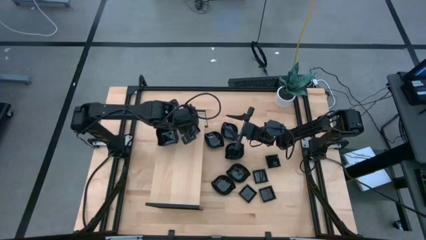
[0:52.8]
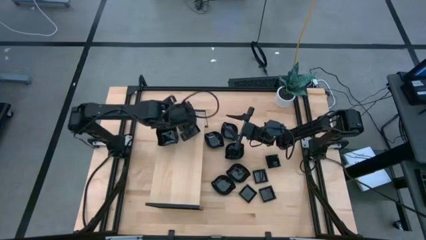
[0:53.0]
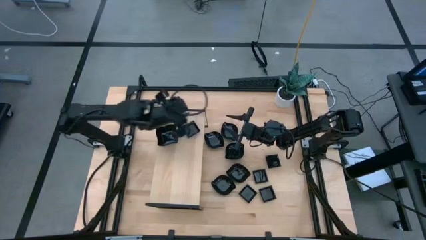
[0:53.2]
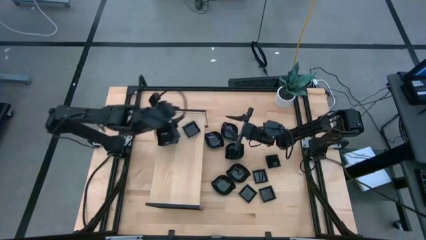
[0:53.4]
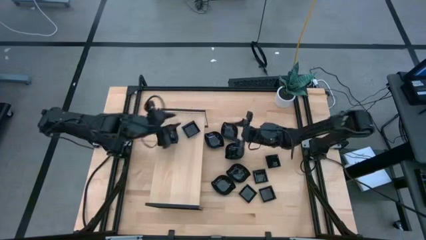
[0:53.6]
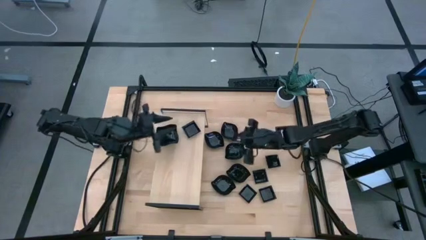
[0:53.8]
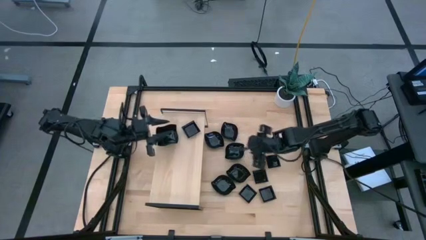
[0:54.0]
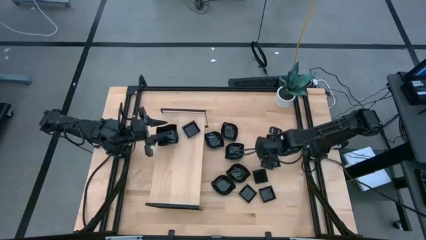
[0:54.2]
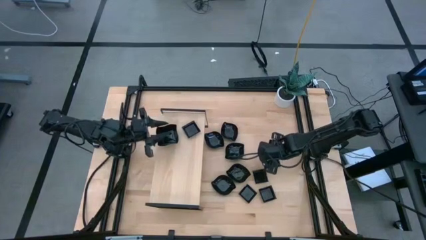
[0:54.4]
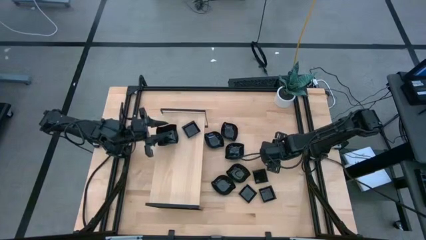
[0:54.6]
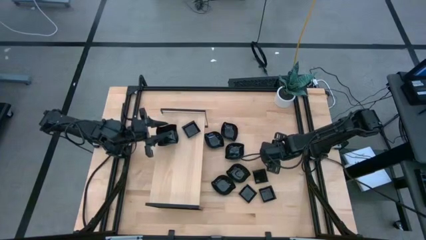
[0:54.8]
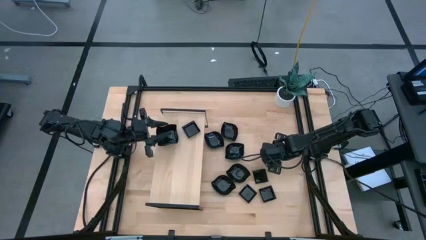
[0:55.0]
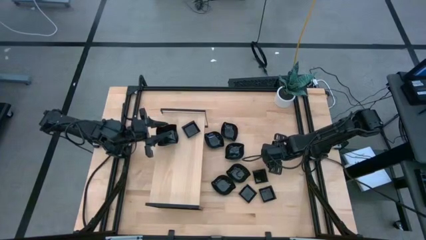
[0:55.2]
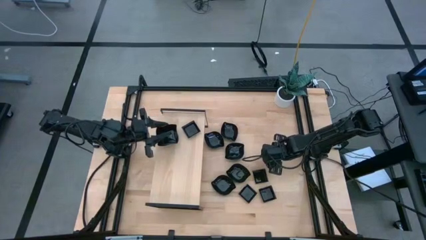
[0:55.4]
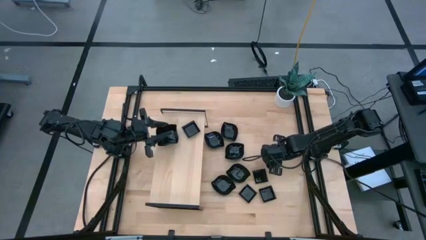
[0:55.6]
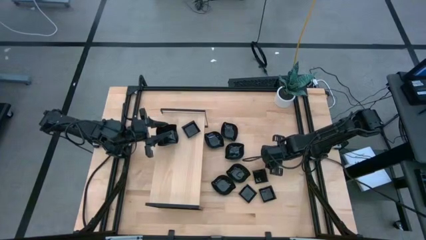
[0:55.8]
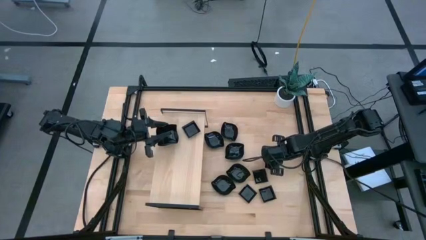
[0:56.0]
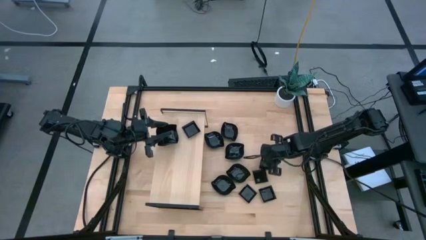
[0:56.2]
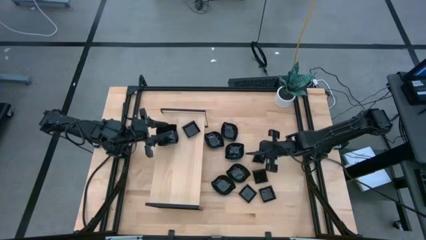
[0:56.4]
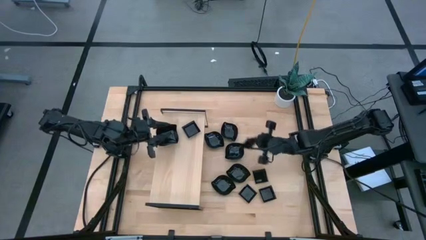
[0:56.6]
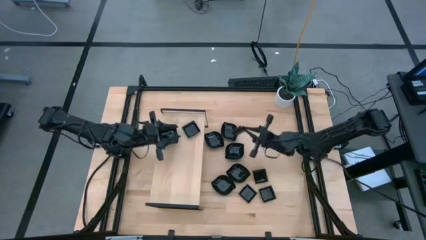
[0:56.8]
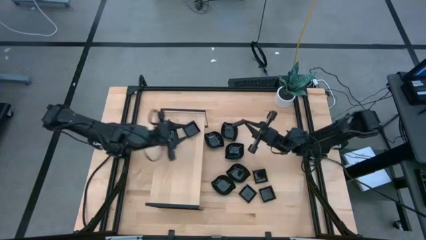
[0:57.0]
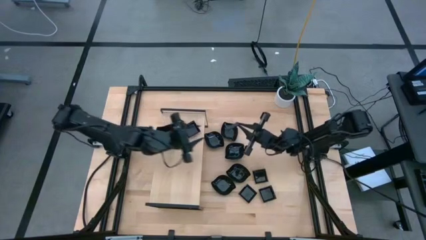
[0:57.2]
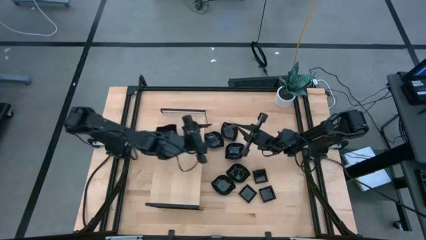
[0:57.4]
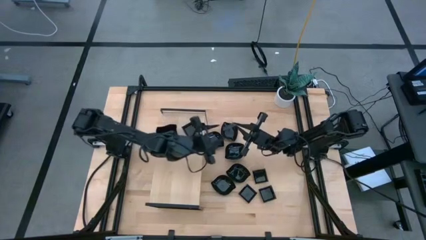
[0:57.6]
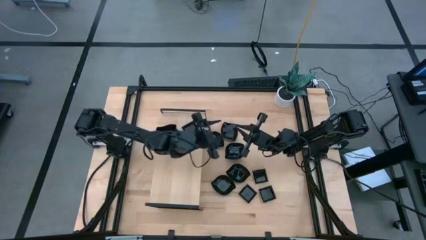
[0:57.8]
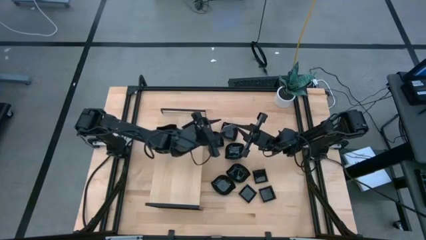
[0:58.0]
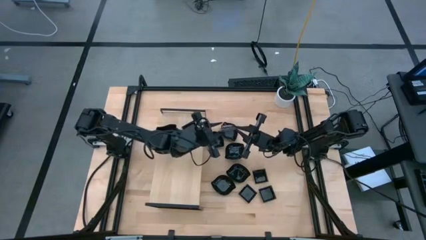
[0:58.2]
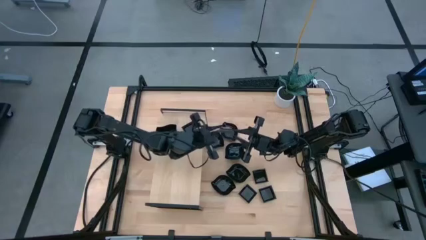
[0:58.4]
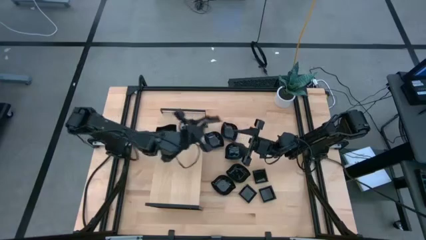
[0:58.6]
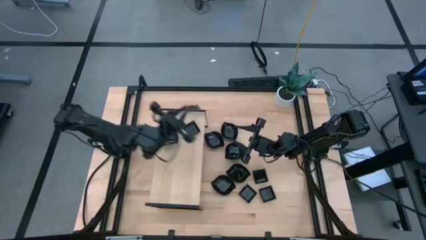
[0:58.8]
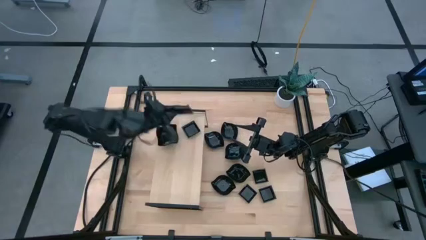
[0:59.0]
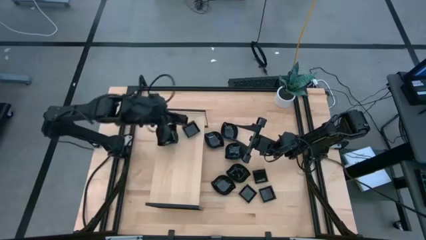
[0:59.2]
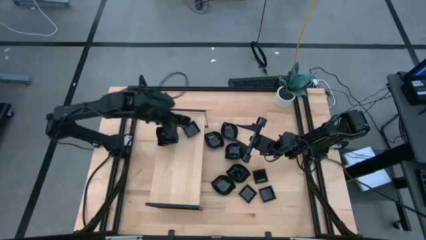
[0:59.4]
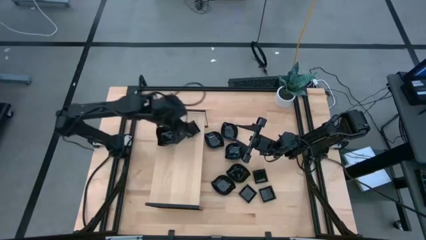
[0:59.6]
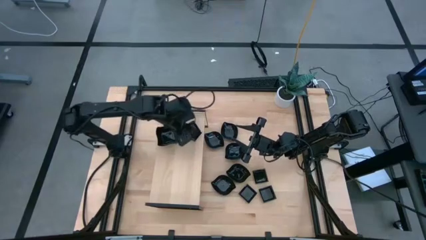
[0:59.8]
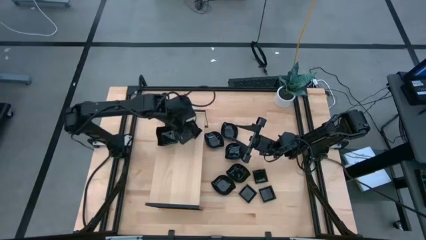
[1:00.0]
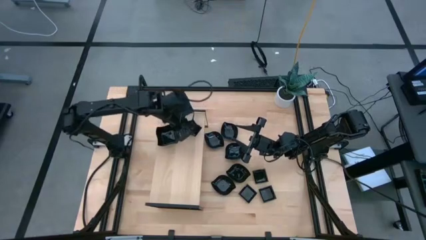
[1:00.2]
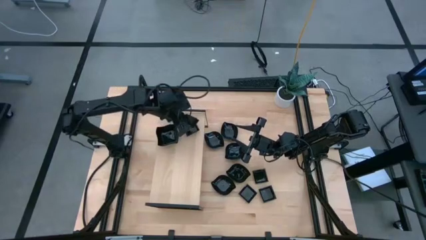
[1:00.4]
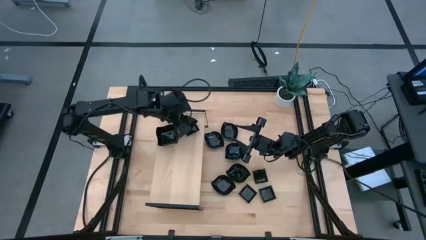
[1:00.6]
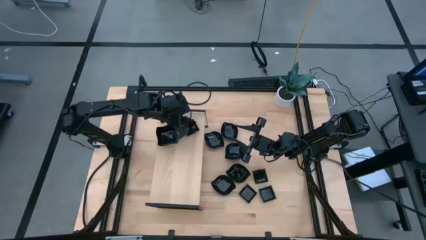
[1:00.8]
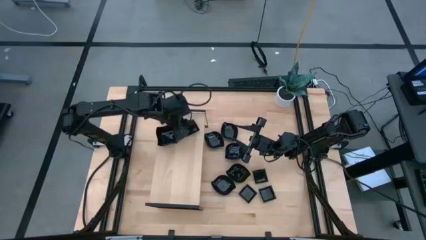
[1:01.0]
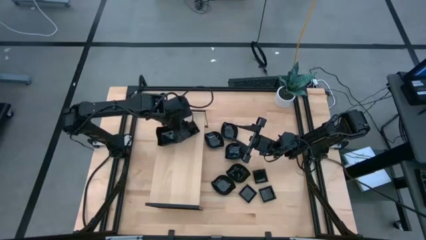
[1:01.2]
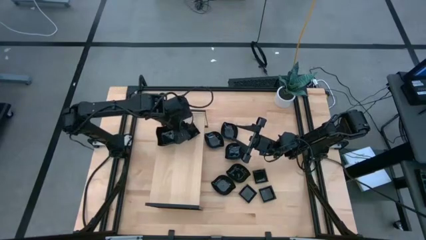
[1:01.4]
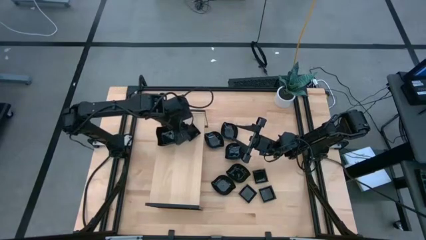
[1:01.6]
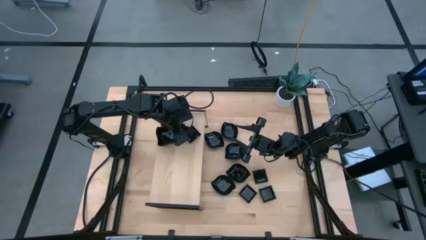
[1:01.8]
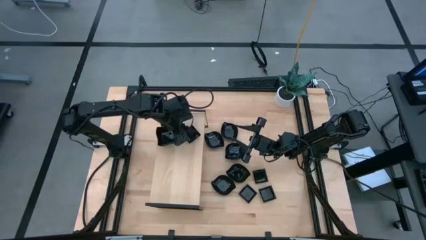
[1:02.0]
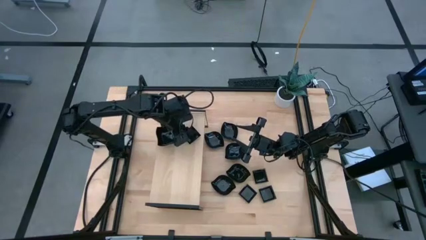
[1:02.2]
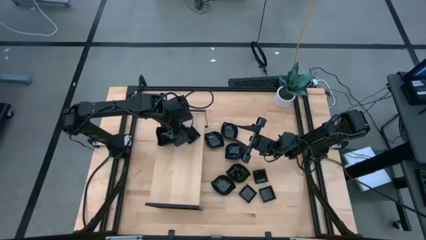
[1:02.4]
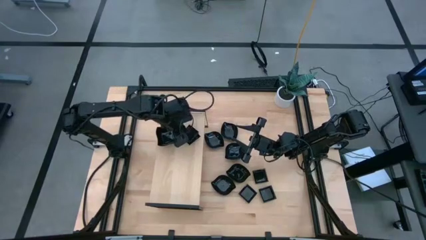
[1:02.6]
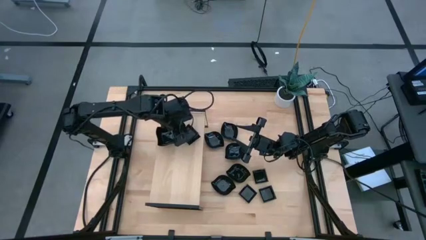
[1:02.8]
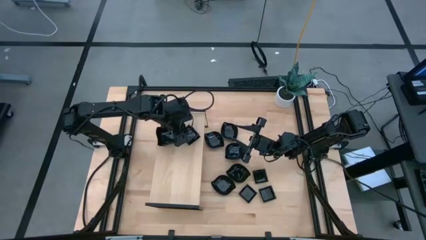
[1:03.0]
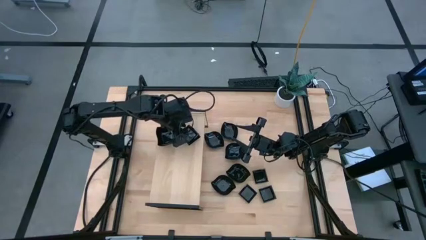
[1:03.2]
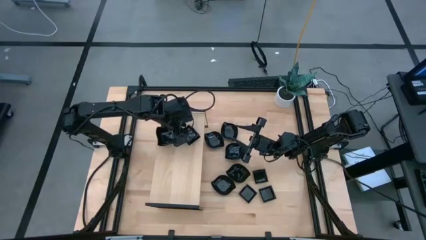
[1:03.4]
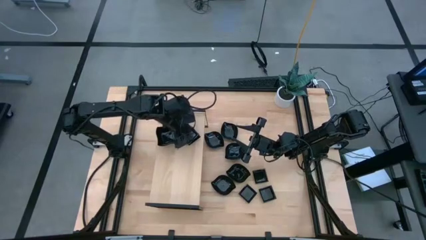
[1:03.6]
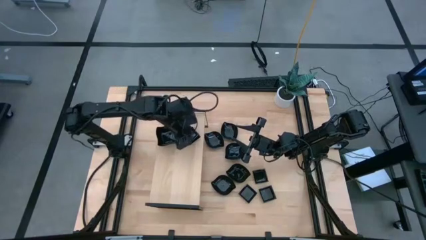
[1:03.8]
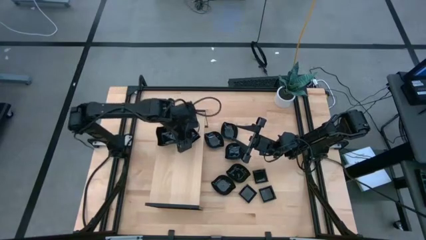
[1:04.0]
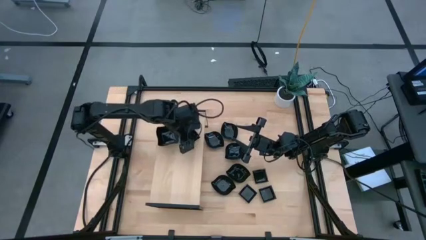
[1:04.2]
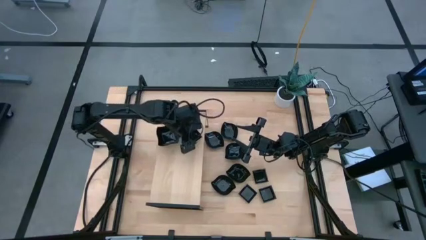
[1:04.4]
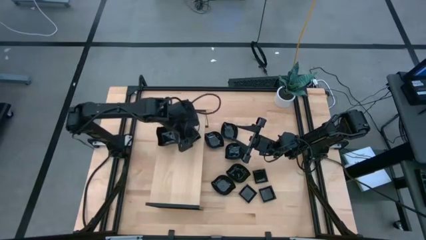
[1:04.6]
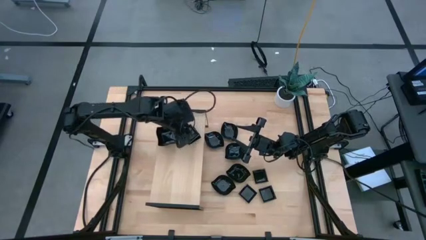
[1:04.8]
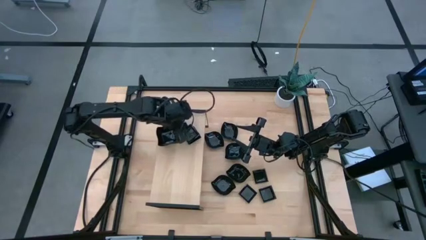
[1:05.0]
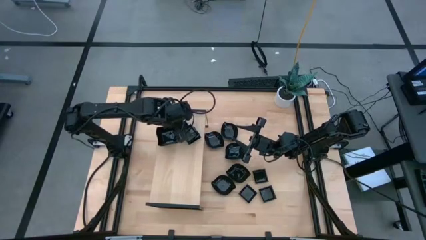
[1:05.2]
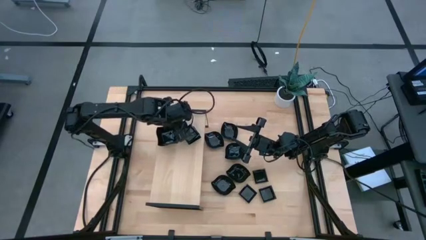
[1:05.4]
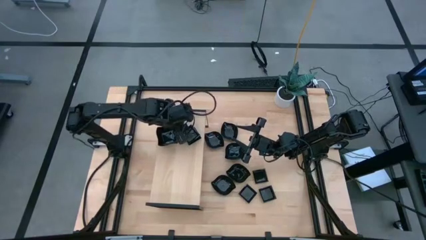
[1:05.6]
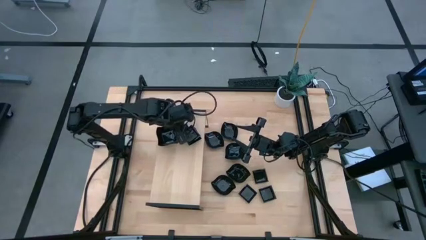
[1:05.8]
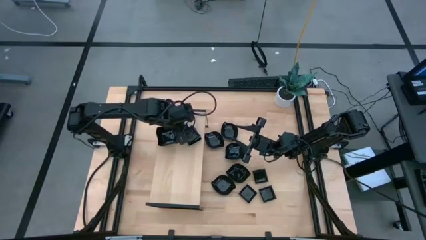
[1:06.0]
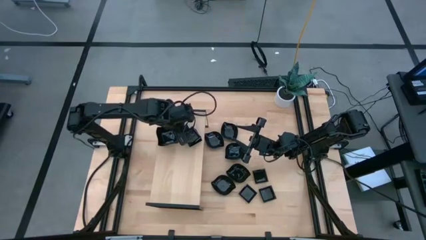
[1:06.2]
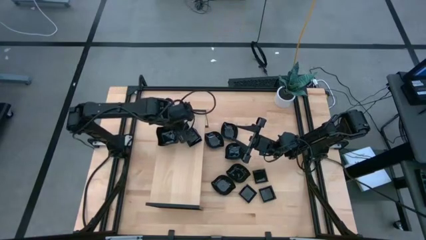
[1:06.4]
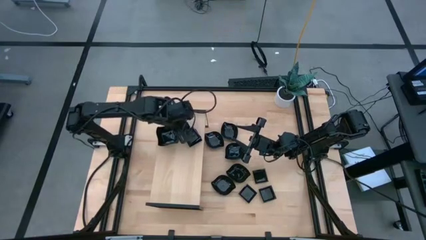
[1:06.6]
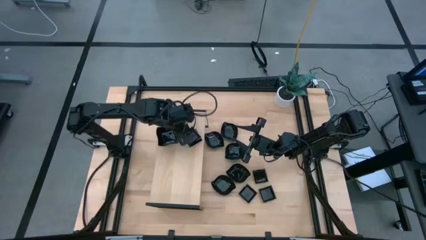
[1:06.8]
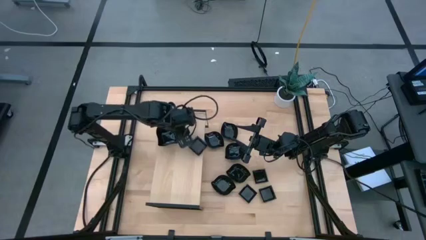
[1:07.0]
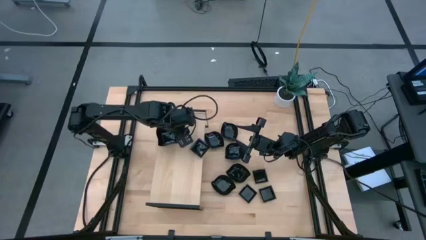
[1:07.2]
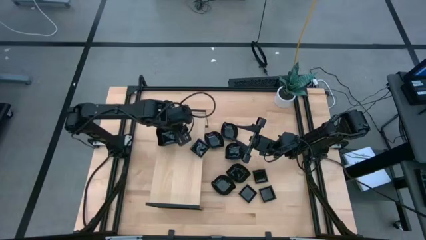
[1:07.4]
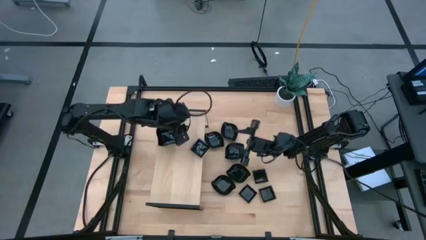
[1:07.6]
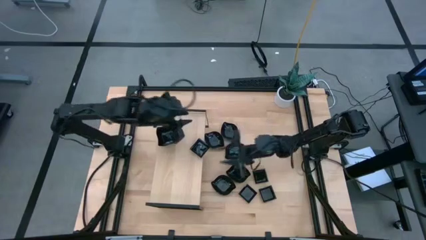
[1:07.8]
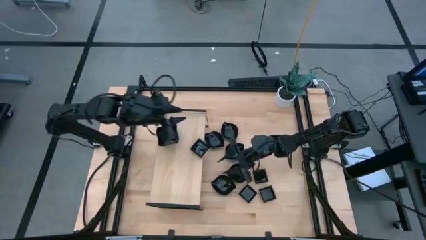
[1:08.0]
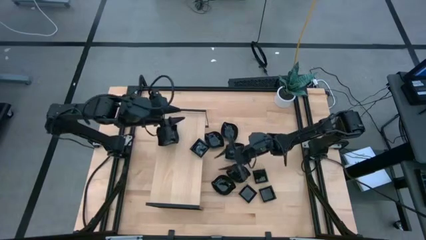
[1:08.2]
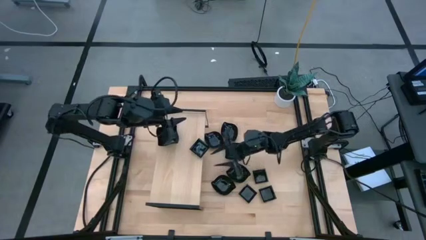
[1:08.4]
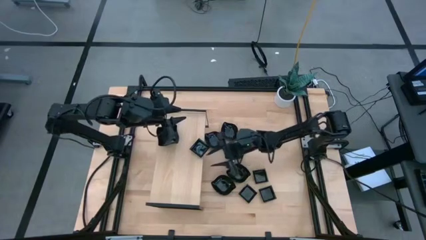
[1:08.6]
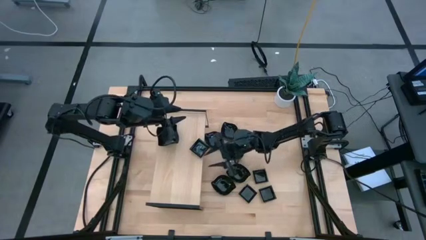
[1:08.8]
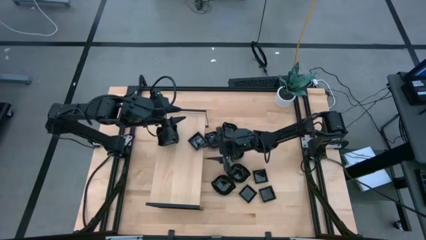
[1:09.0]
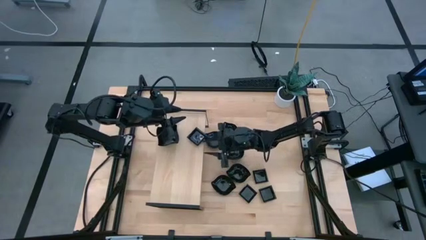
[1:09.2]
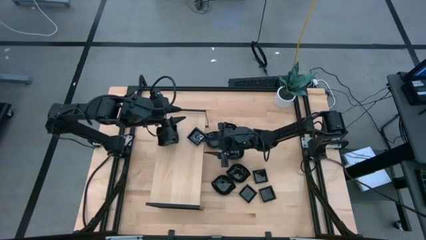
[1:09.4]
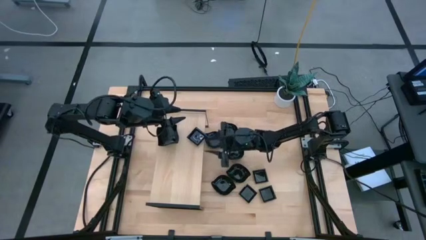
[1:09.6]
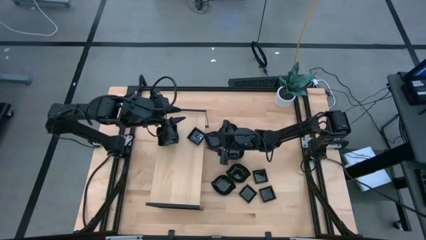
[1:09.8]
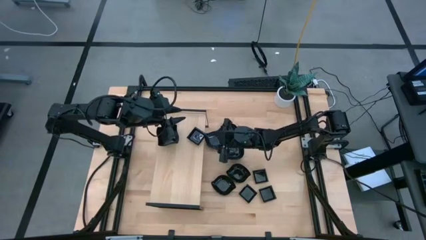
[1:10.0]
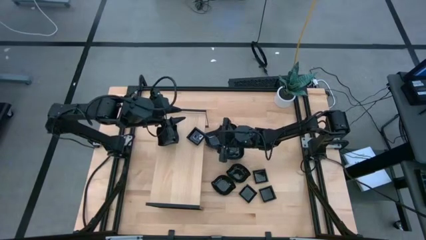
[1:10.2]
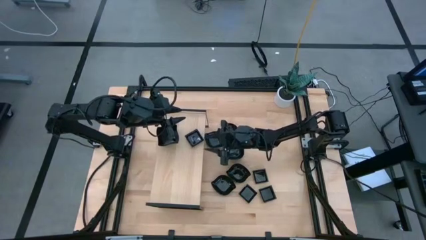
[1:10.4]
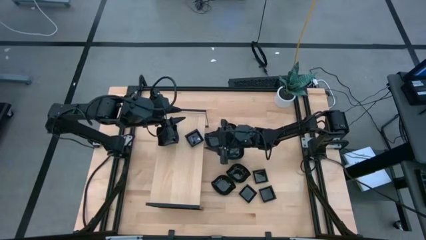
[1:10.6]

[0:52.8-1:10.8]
Task: Pick & Place Mini shaped plates
Stack the square plate on top of the square plate on the shelf
